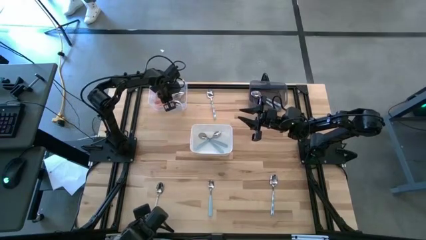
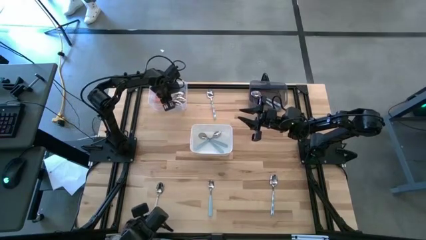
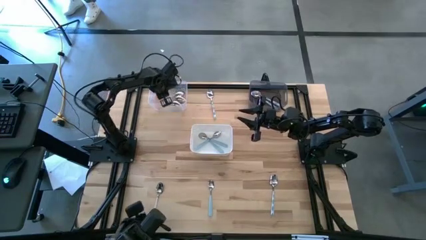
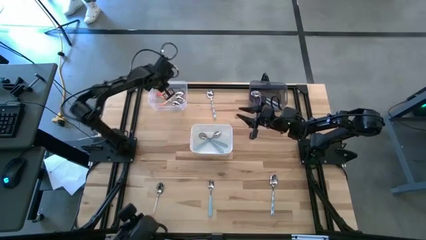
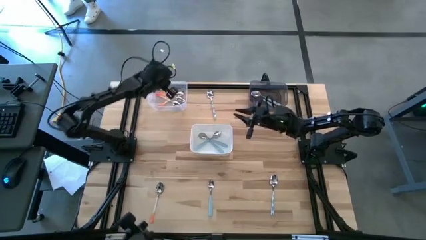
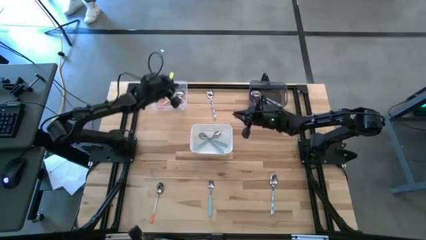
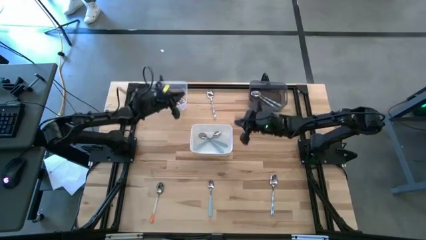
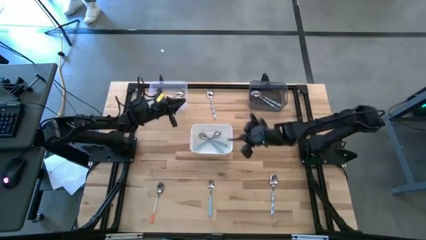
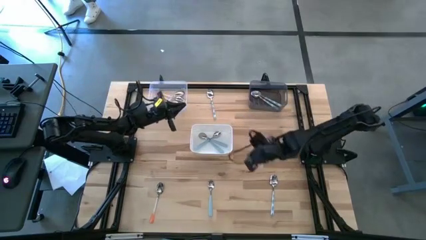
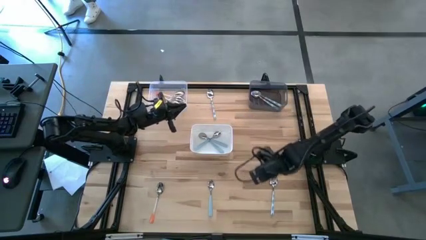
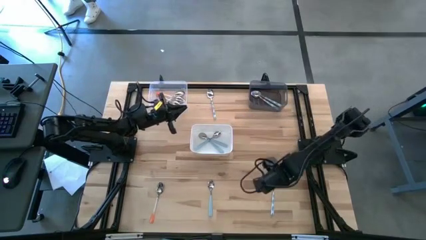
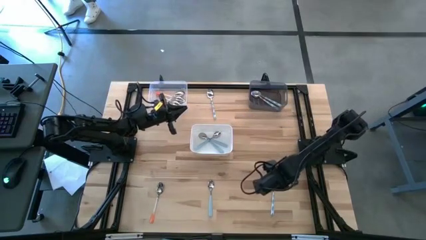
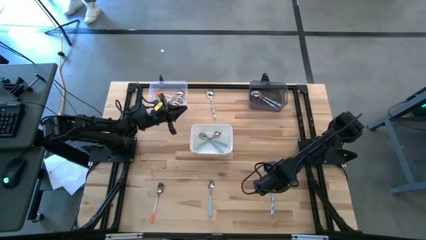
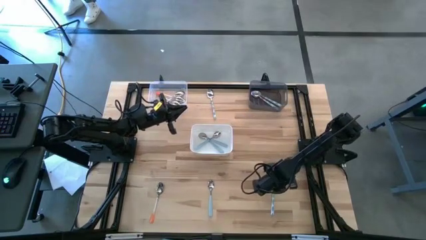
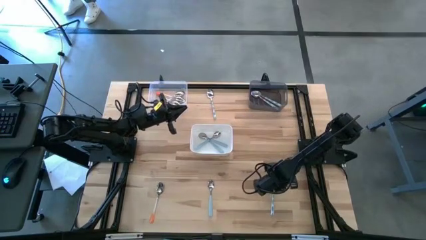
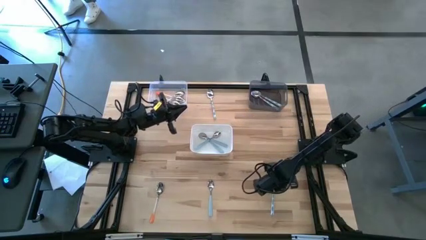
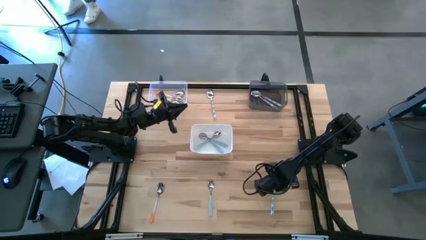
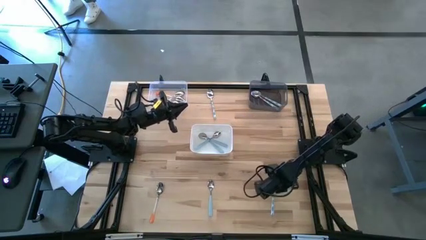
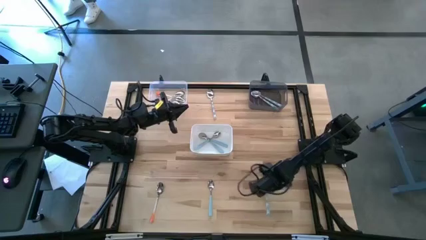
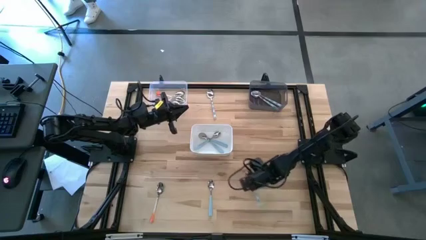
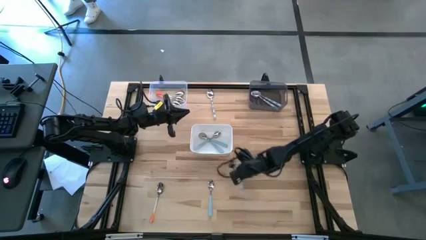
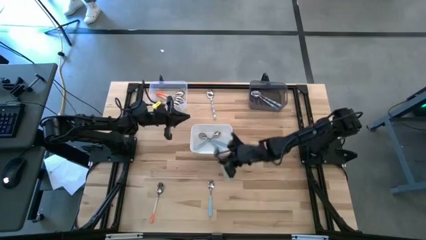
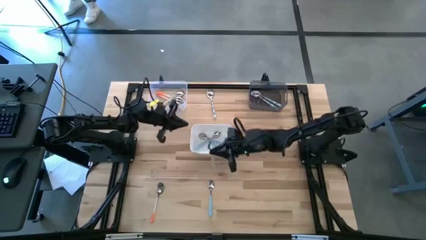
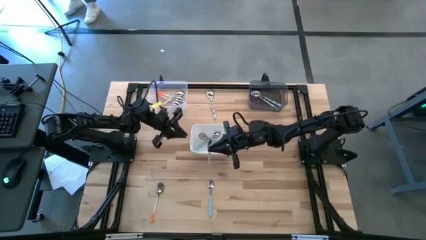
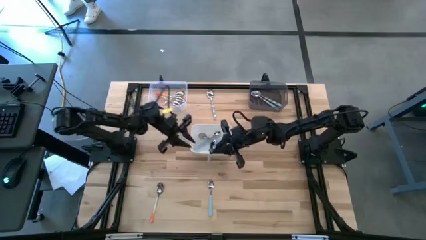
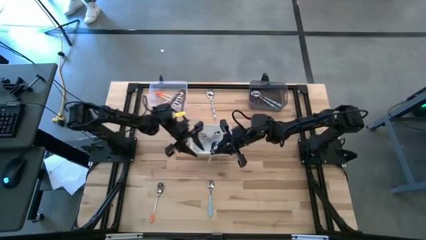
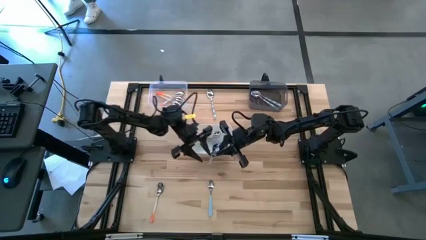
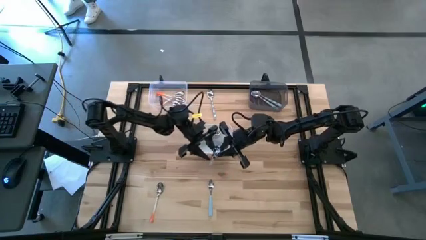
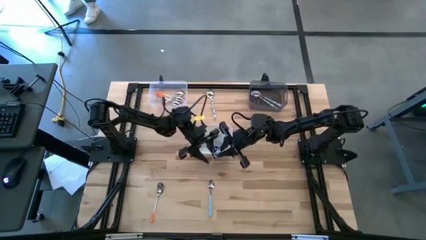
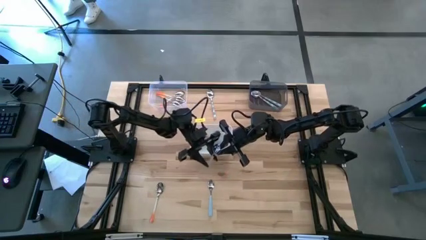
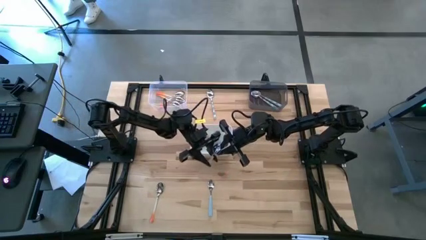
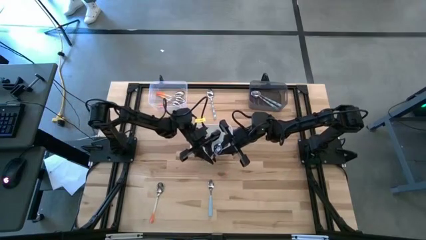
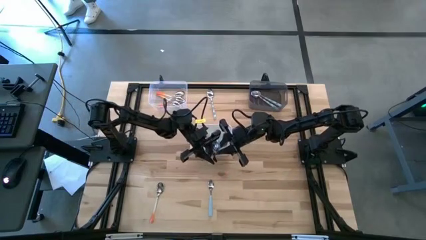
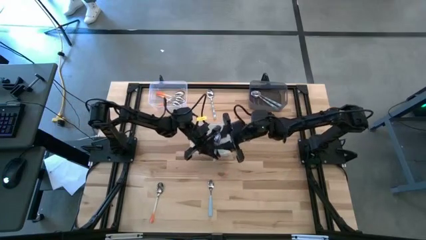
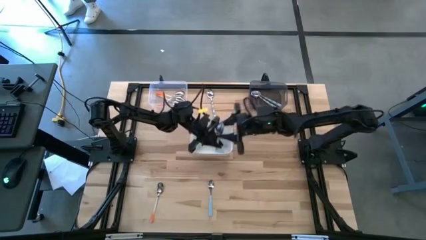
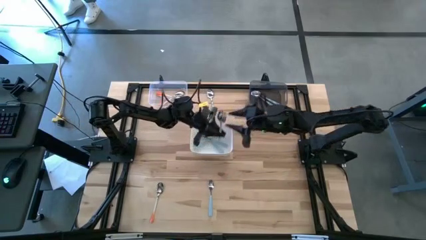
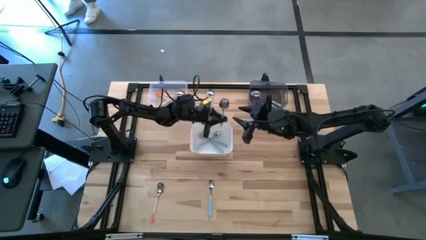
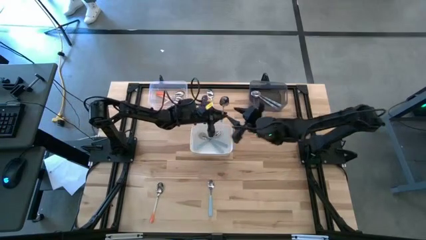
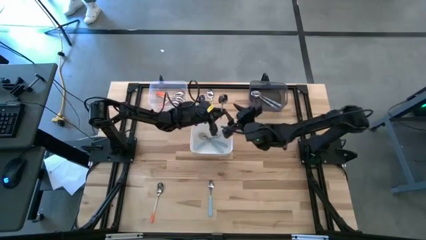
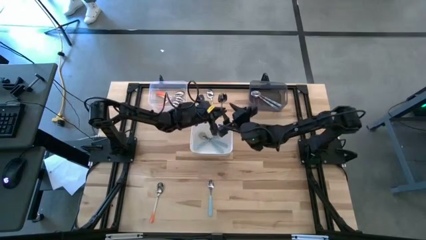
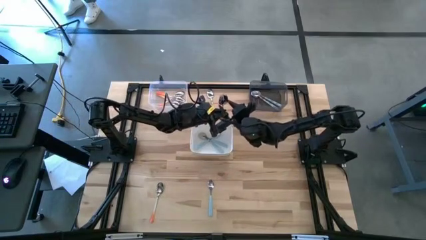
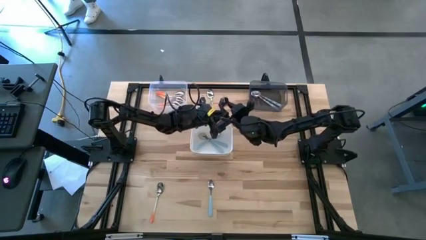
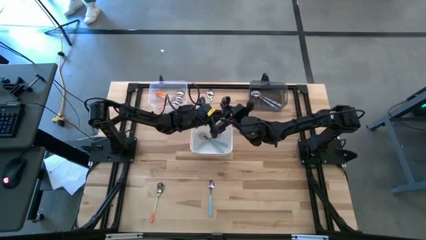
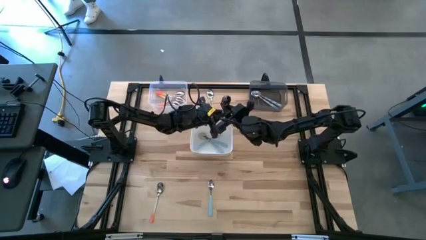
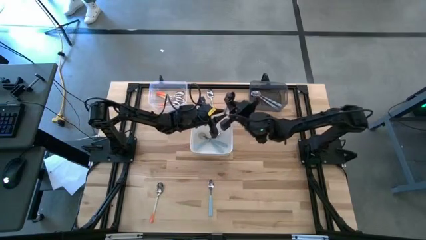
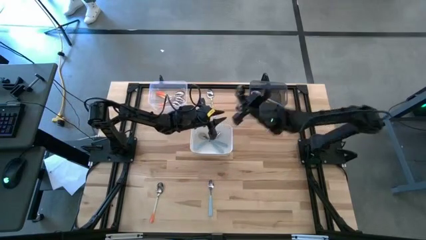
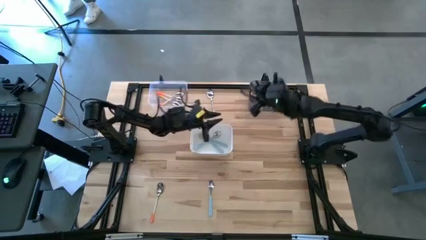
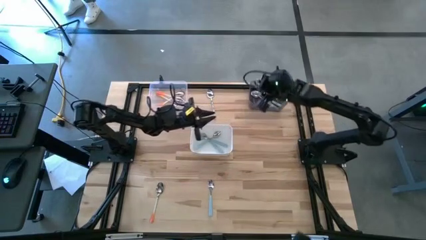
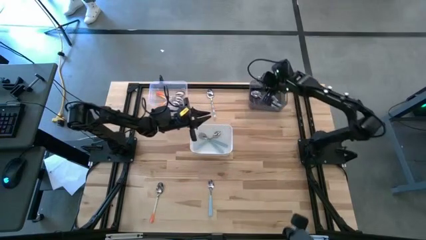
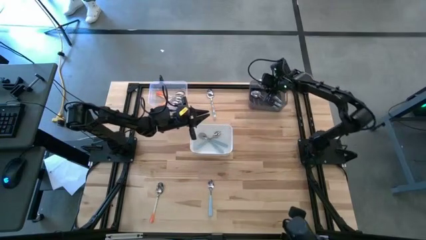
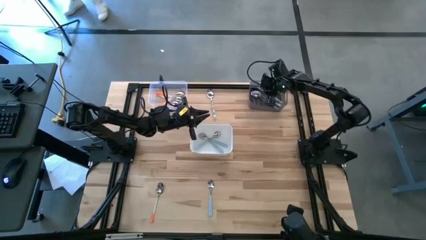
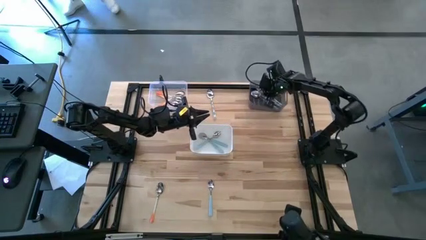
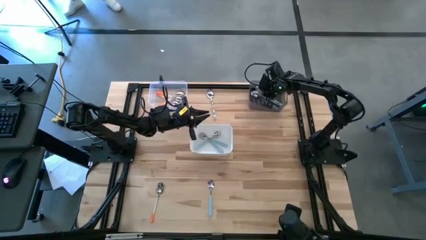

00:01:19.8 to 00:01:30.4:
Task: Sort silverware by color (type)
Put the blue patterned spoon into the black bin

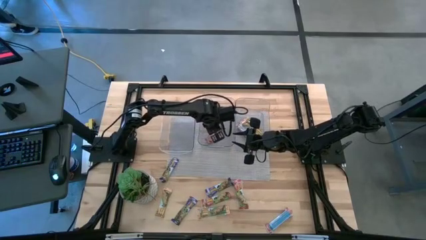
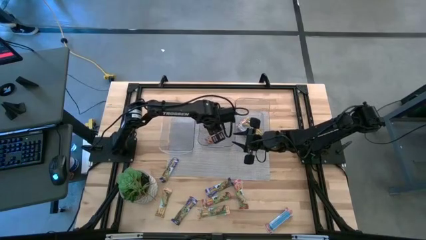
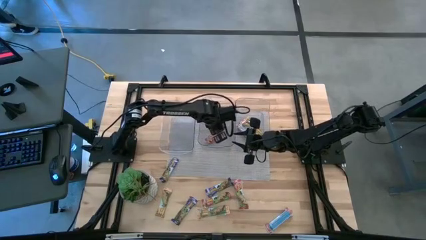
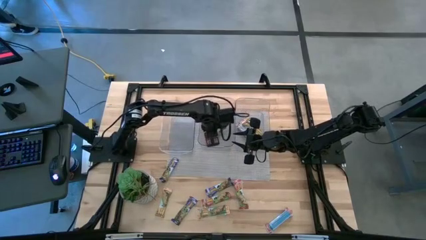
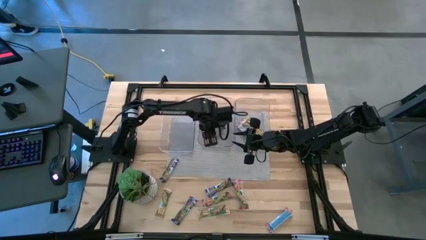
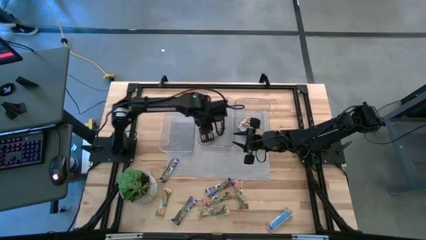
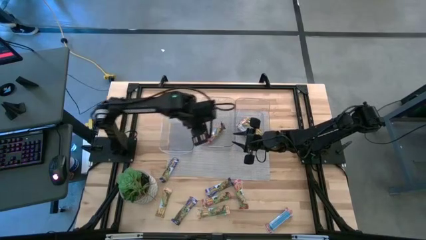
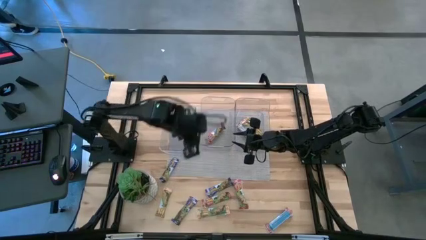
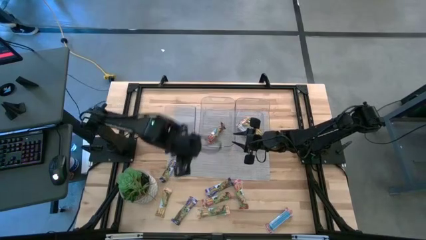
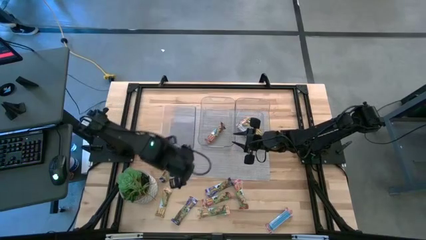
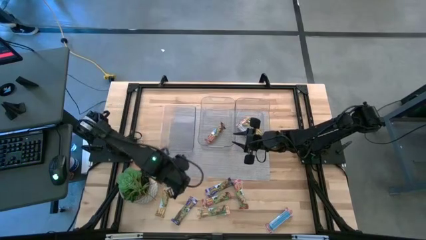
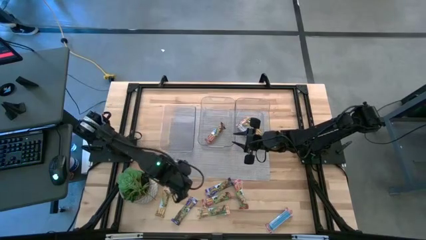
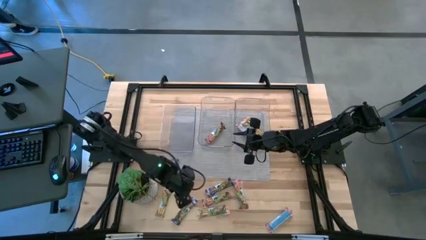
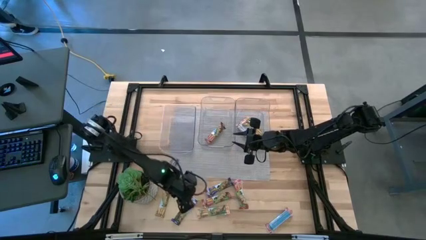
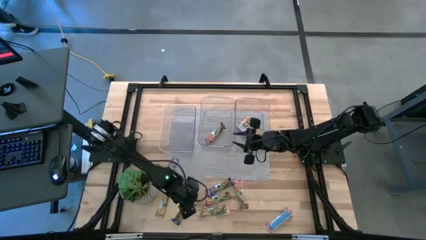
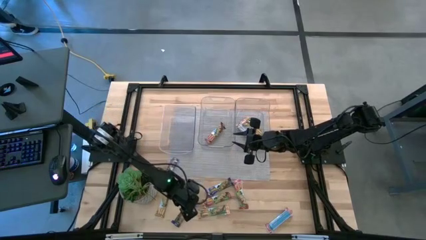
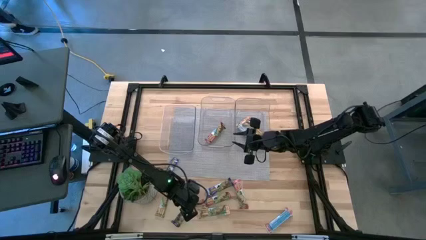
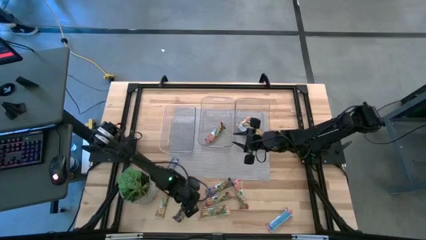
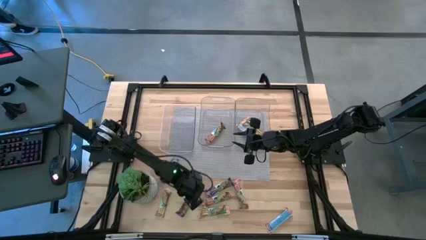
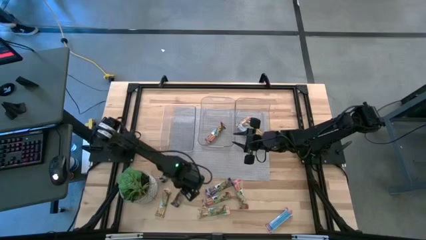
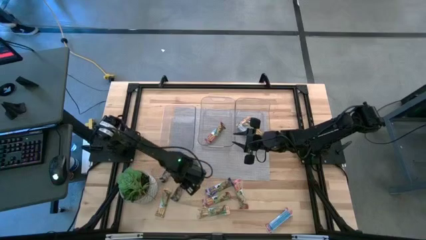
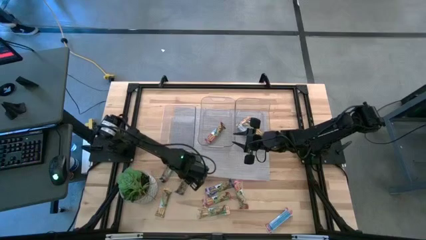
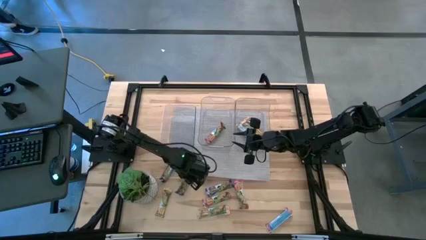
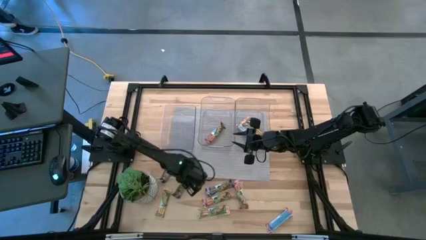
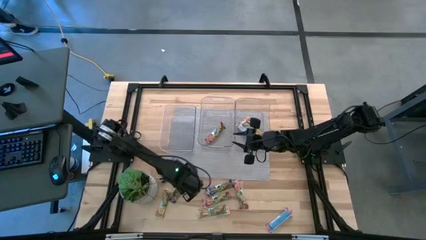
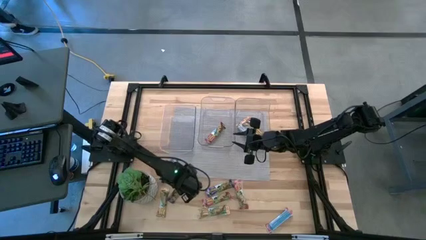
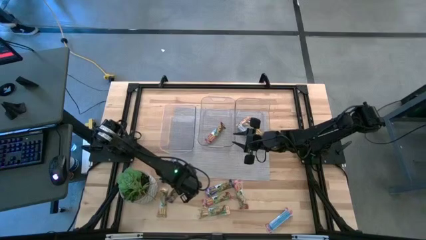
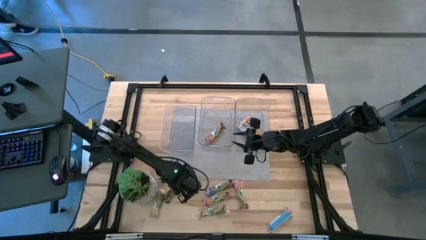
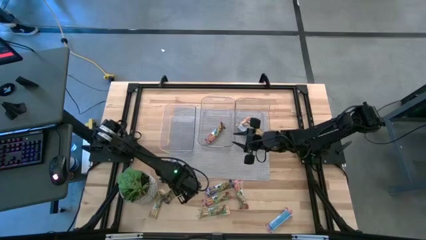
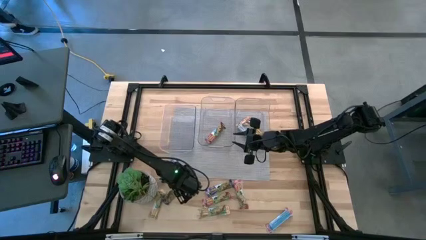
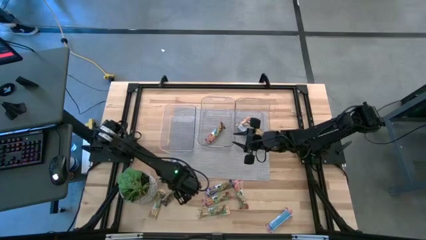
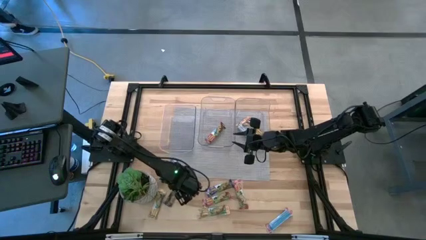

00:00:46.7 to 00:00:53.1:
Task: Pick and place Granola Bars by type
Put the blue granola bar into the left transparent bin

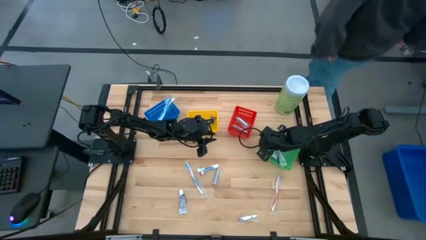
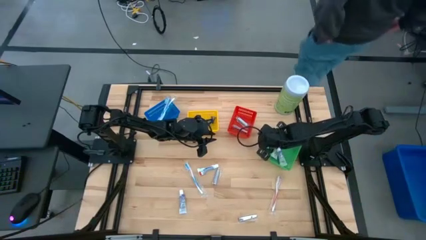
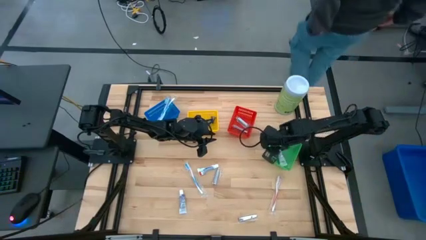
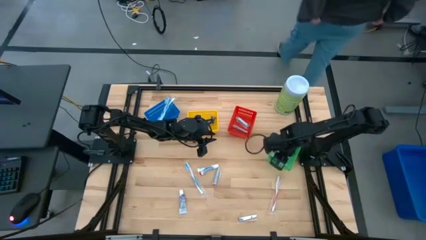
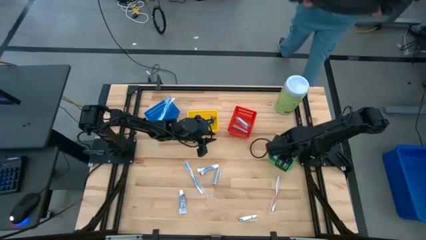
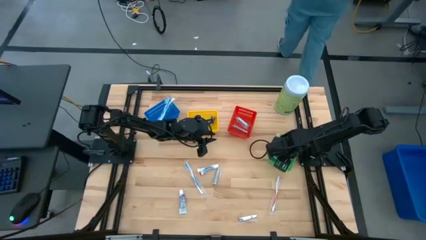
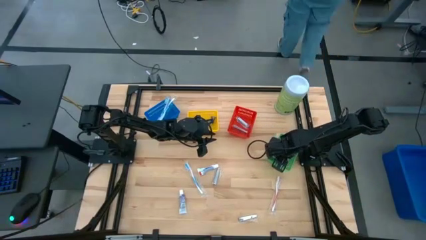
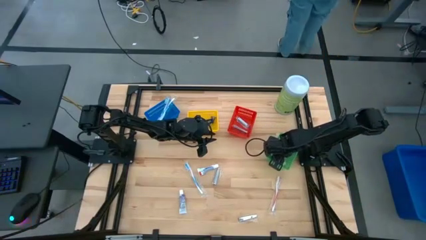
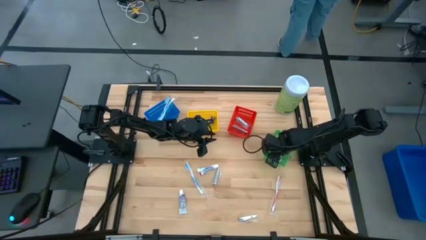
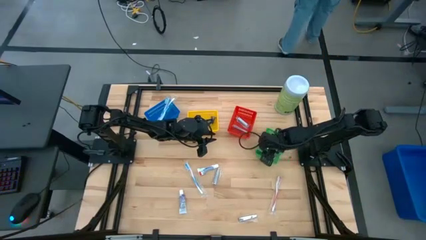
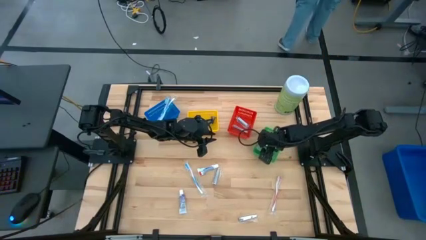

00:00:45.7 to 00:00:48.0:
Task: Pick & Place Travel size toiletries
Adjust the green bin
